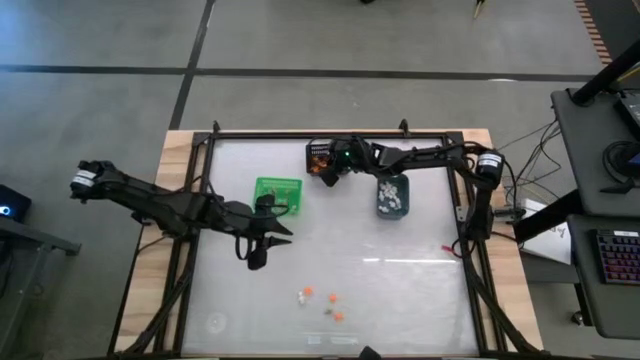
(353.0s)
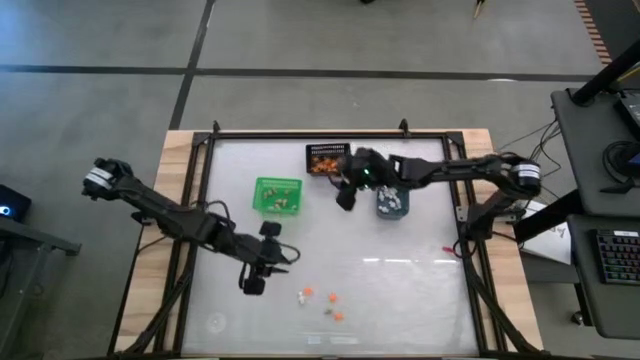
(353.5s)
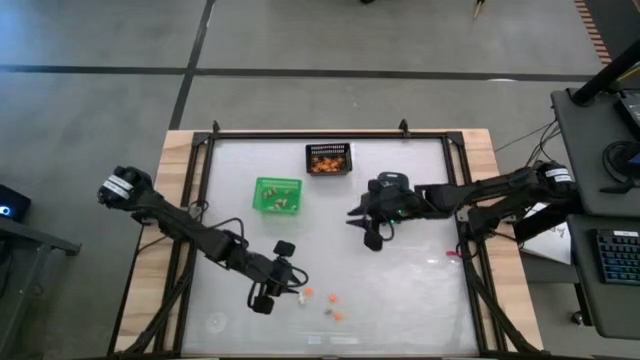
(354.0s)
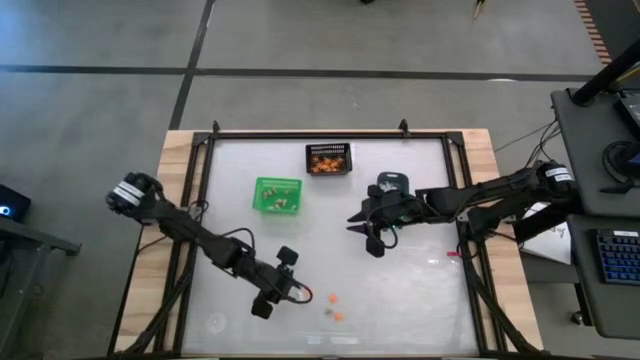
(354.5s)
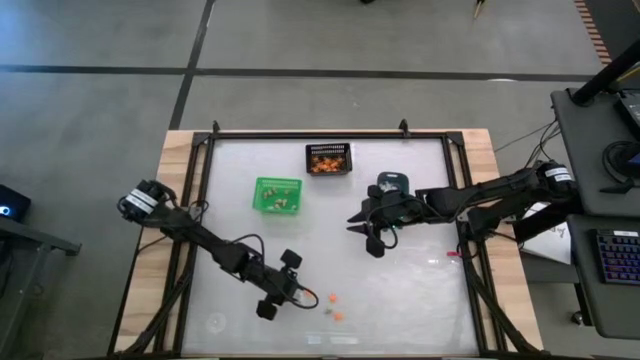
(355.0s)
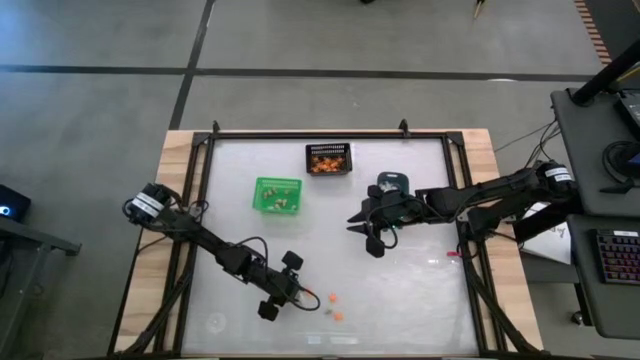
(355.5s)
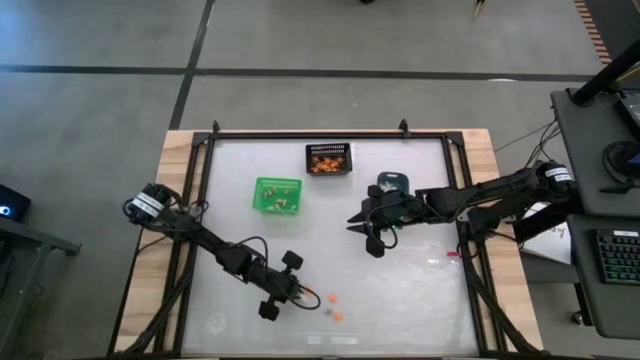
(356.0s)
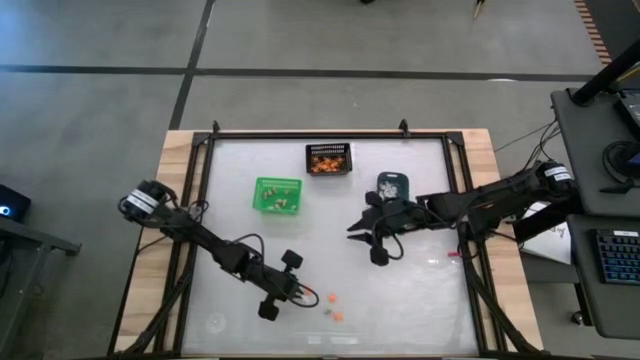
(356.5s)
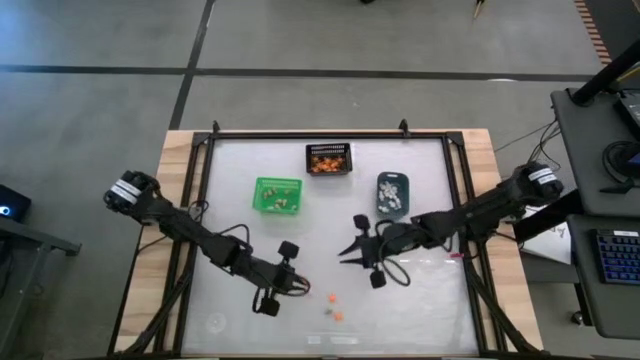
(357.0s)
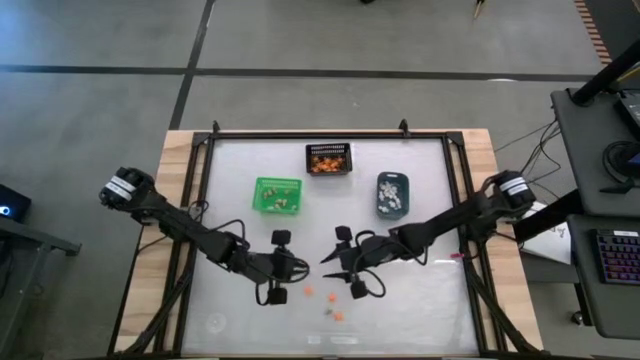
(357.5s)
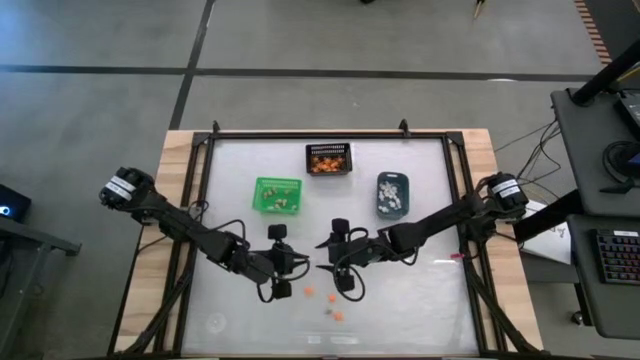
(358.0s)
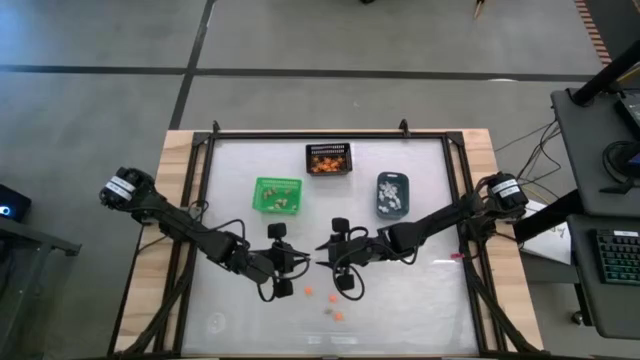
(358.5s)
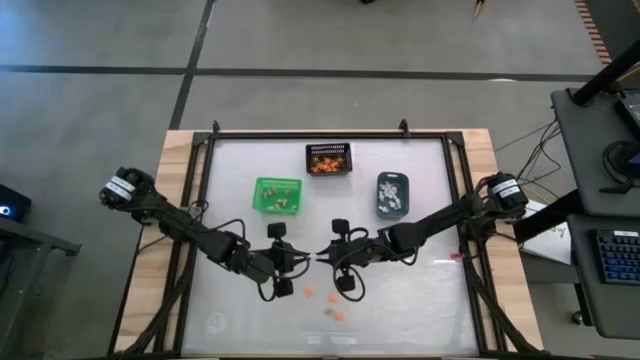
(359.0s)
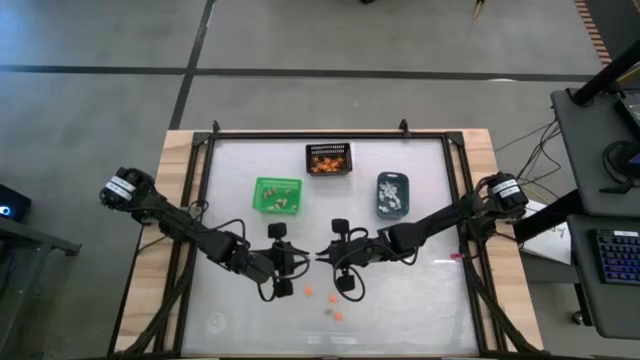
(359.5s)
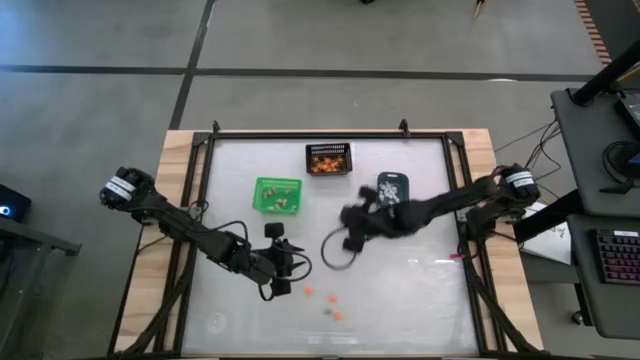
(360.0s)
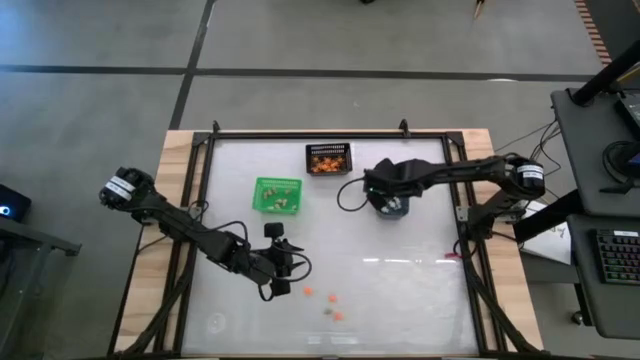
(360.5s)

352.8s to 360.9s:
Task: Sort Halloween decoration
Put the white skeleton toy into the blue bin

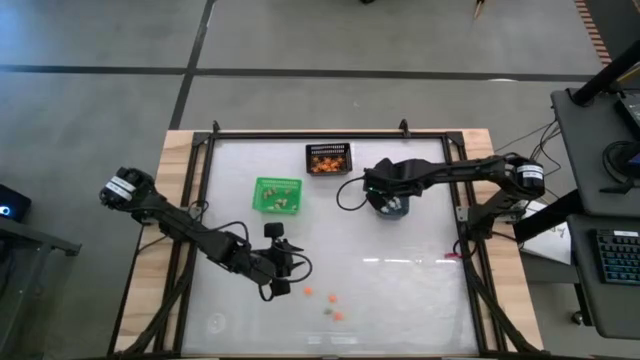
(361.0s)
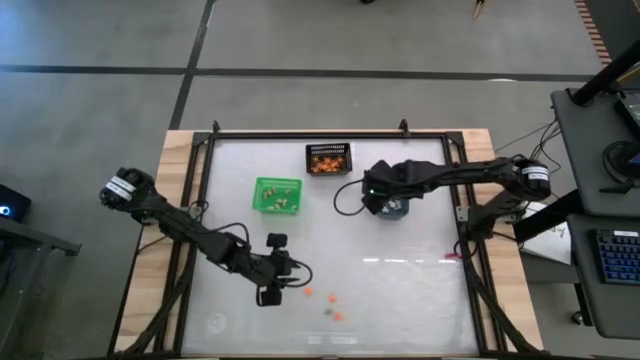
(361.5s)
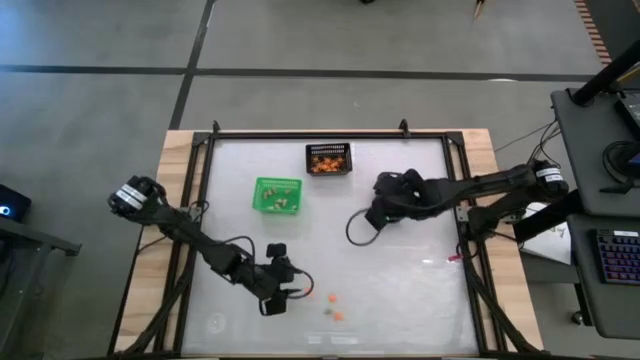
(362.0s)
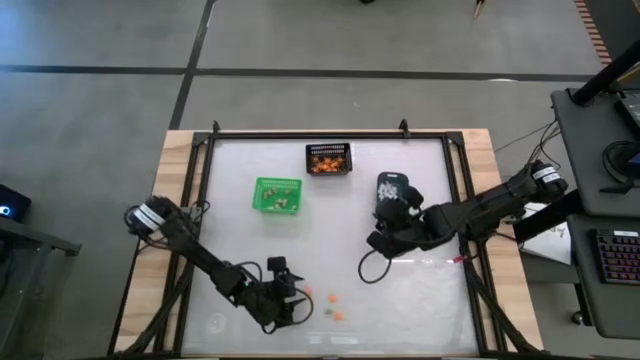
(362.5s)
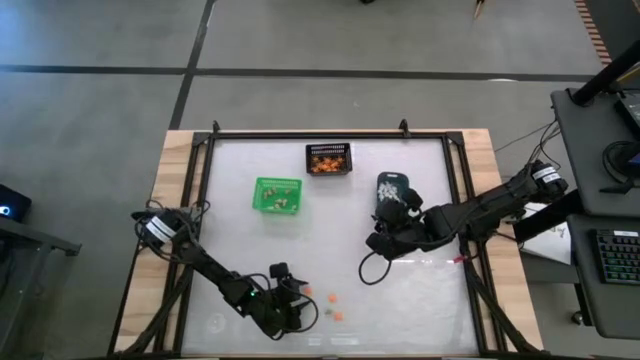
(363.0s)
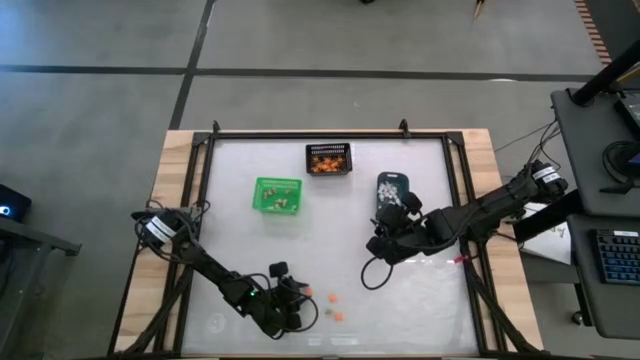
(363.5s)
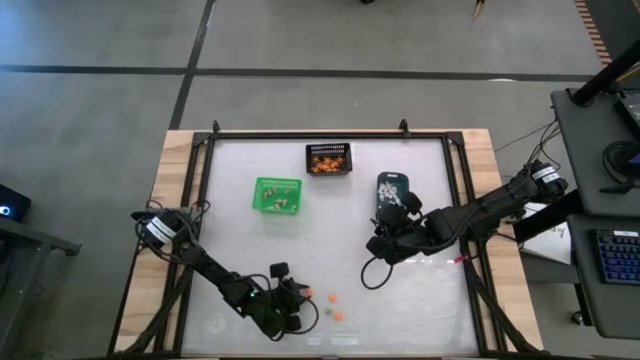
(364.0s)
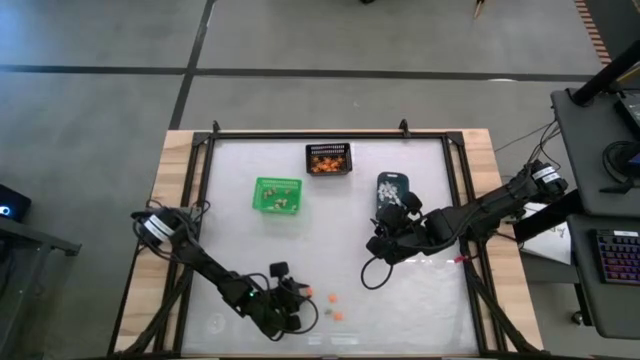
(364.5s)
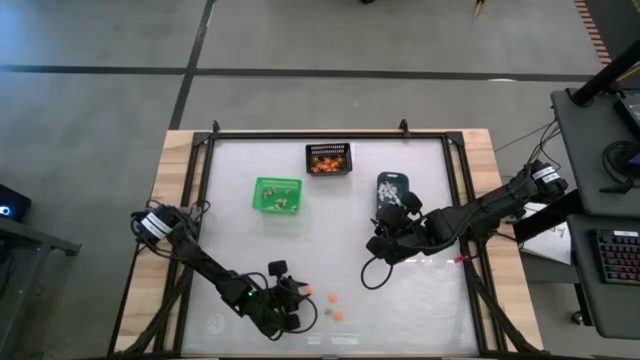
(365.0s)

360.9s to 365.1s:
Put the orange spider toy into the black bin

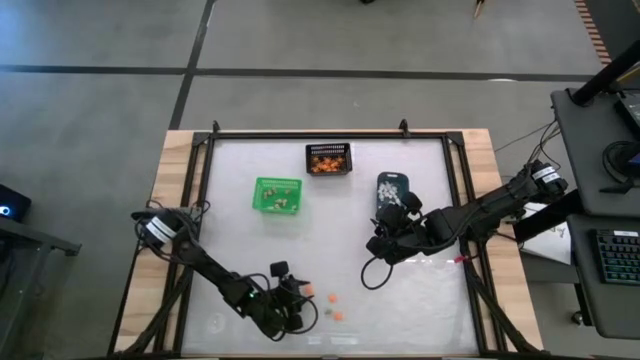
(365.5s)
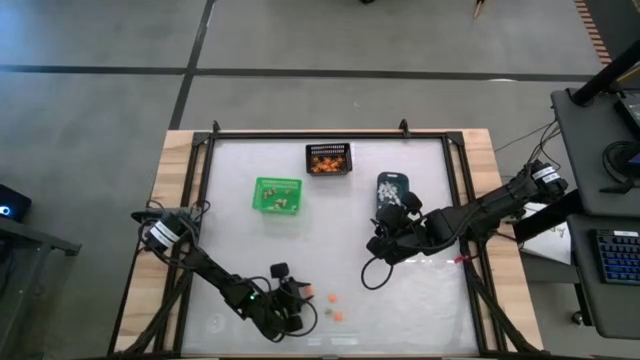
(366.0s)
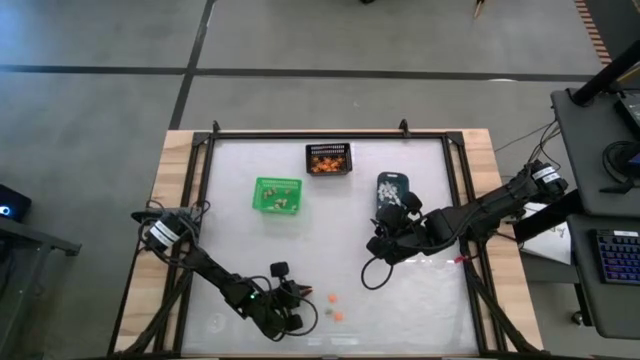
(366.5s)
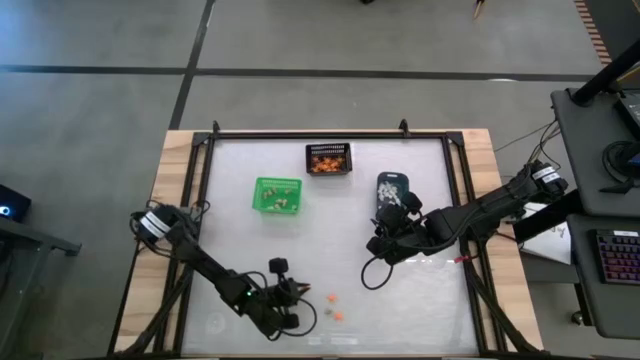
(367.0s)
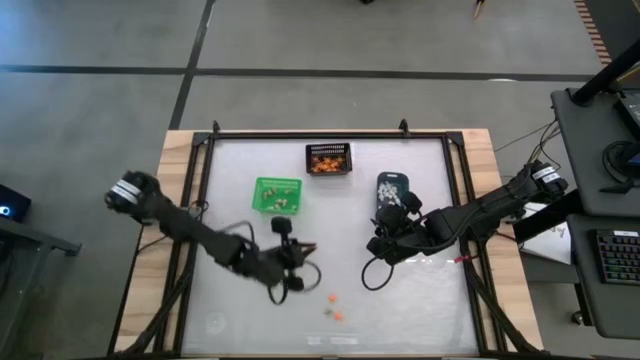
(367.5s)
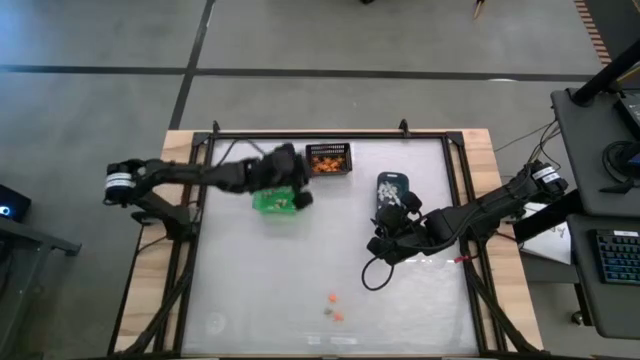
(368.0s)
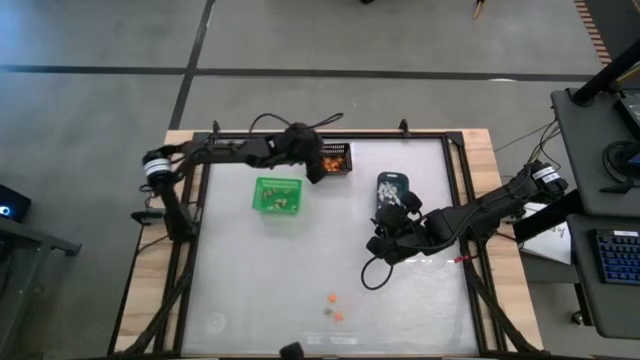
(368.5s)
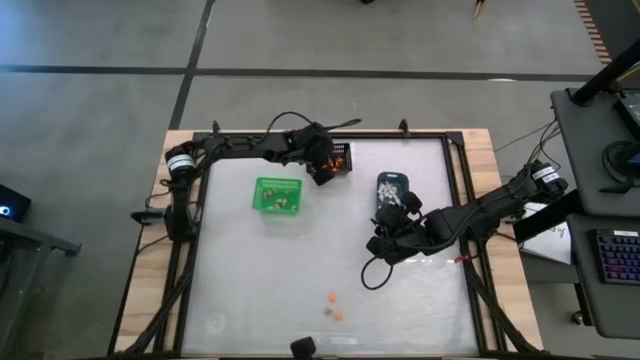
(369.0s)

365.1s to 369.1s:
Put the orange spider toy into the black bin

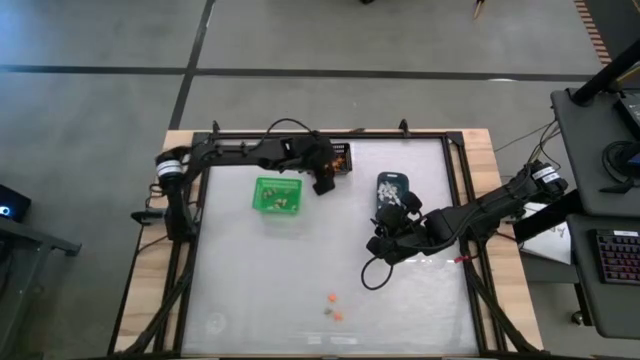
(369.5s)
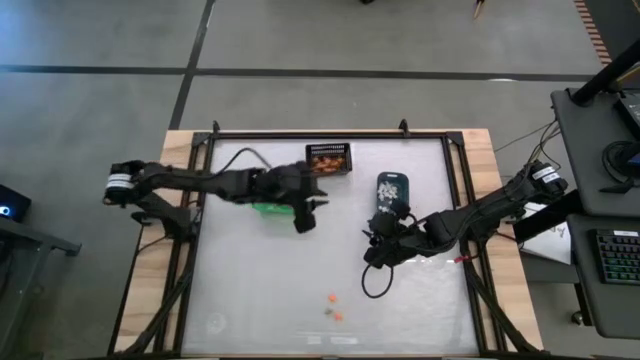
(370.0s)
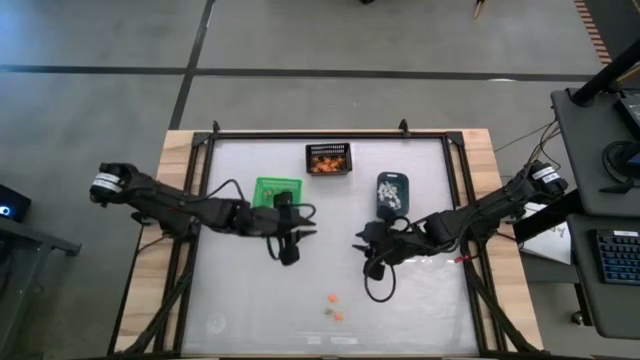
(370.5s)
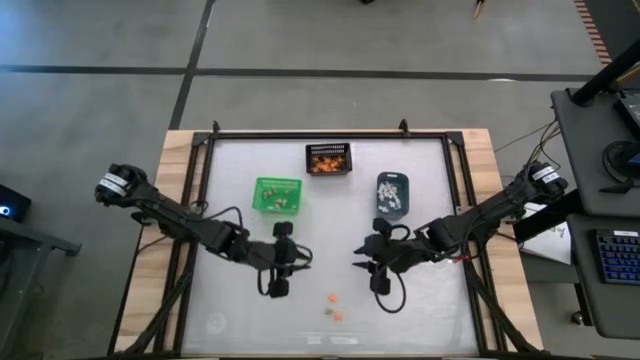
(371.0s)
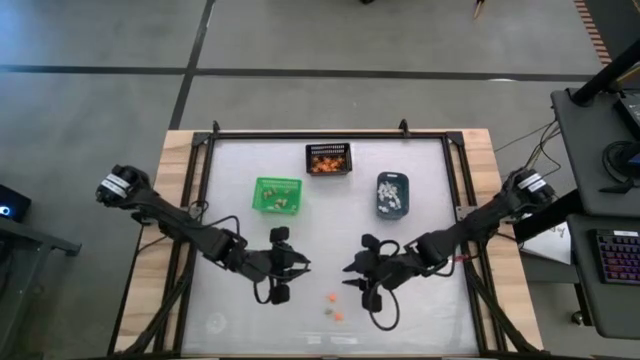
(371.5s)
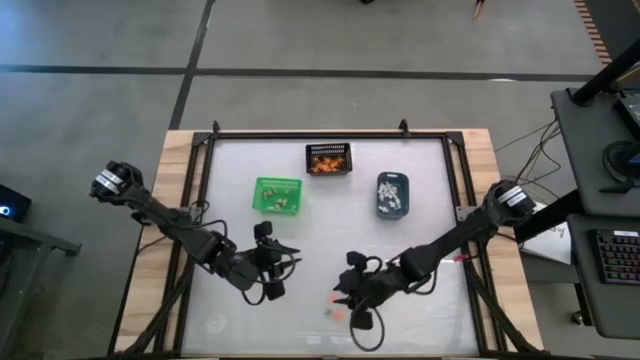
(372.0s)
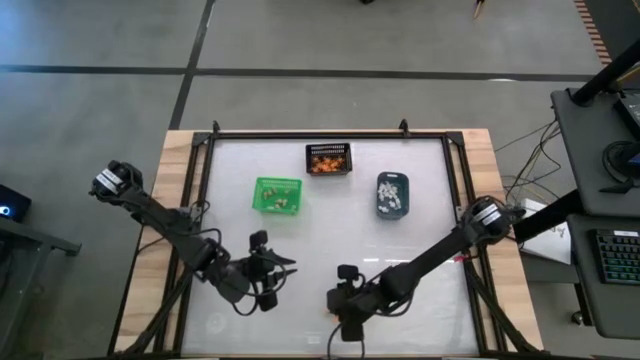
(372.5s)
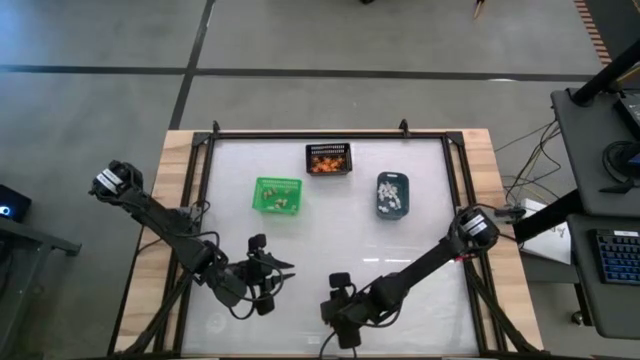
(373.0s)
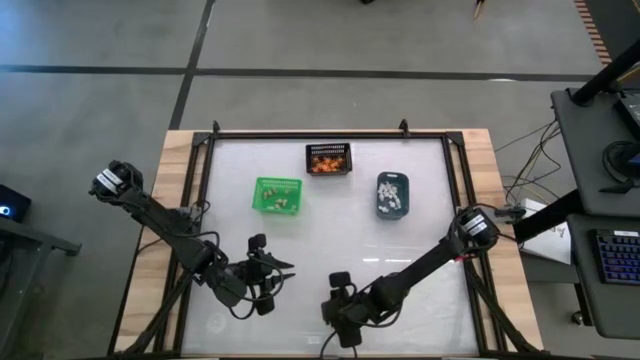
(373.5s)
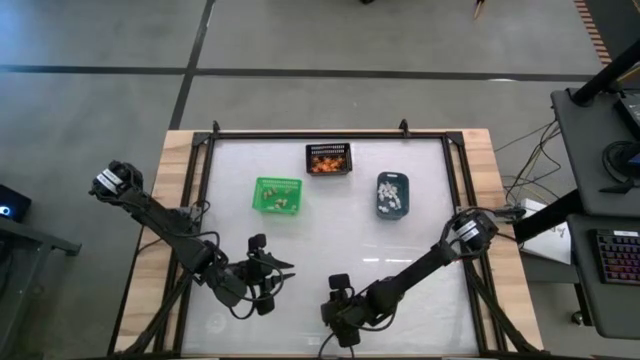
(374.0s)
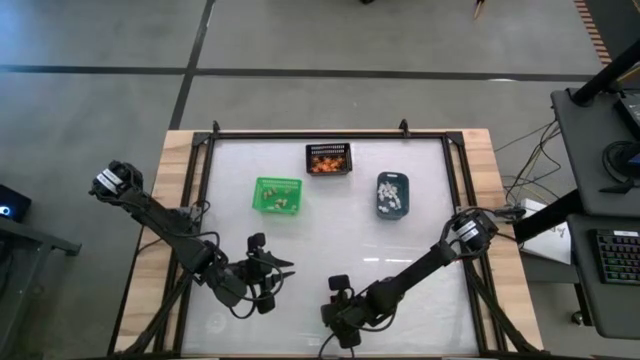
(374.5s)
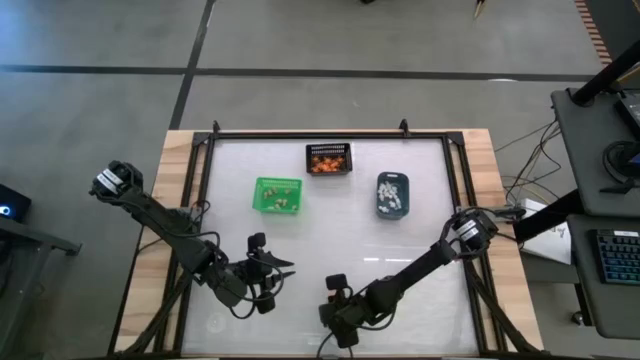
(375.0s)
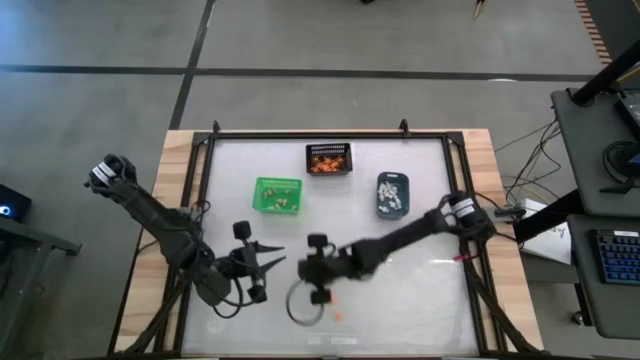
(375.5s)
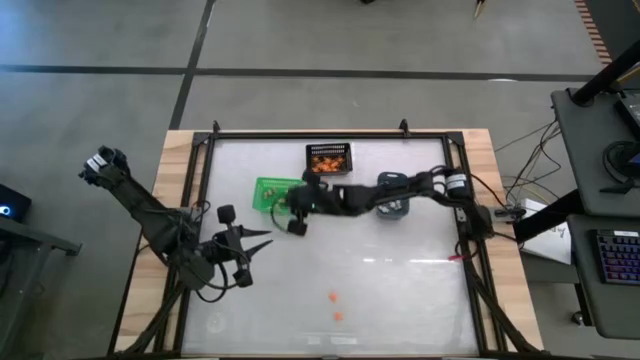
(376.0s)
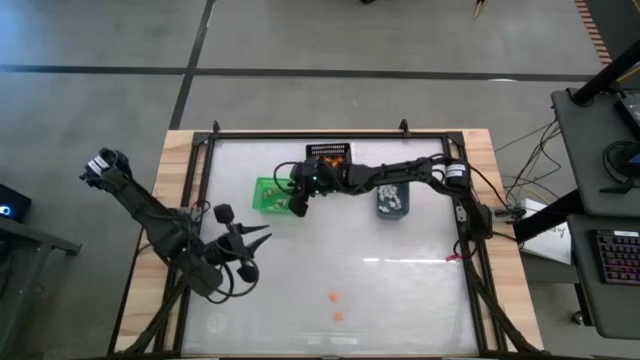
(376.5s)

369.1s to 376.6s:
Put the gray skull toy into the green bin
